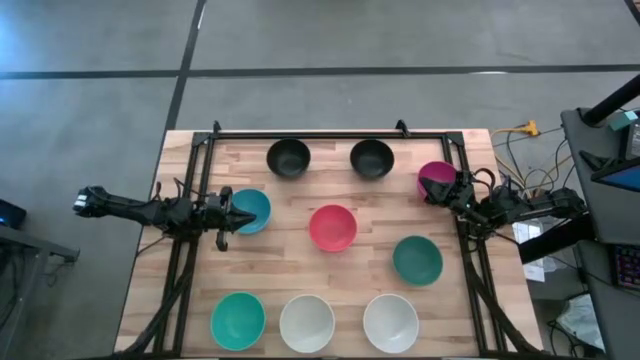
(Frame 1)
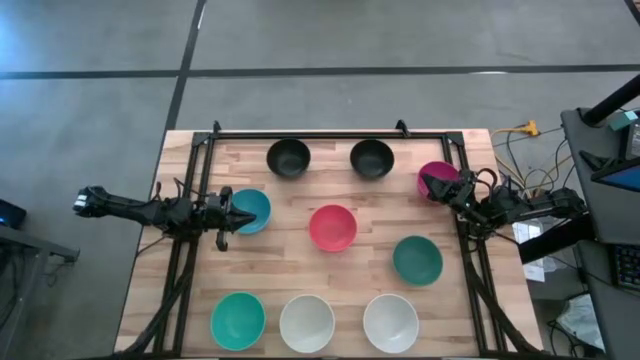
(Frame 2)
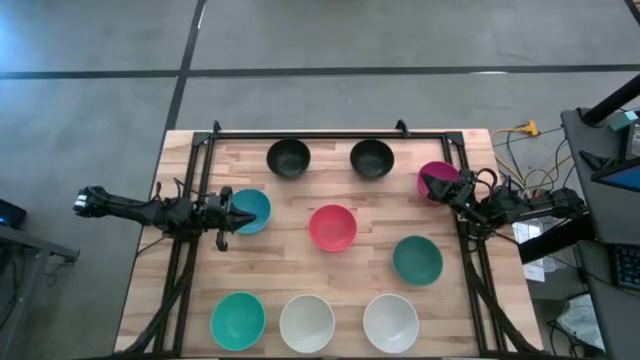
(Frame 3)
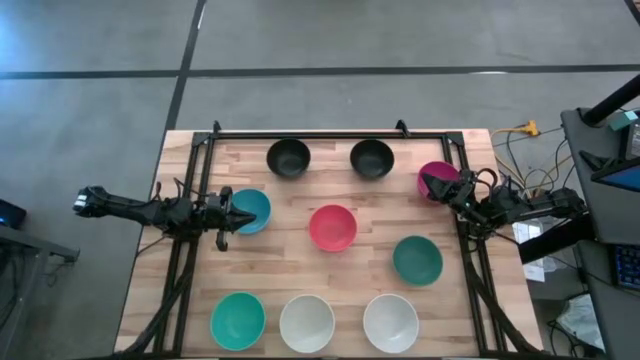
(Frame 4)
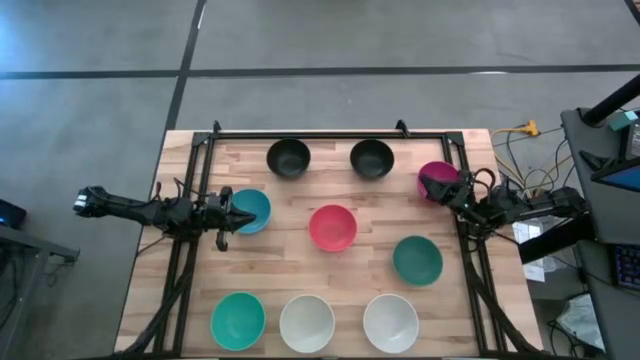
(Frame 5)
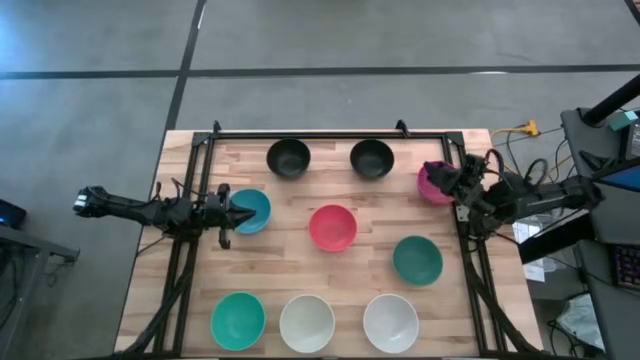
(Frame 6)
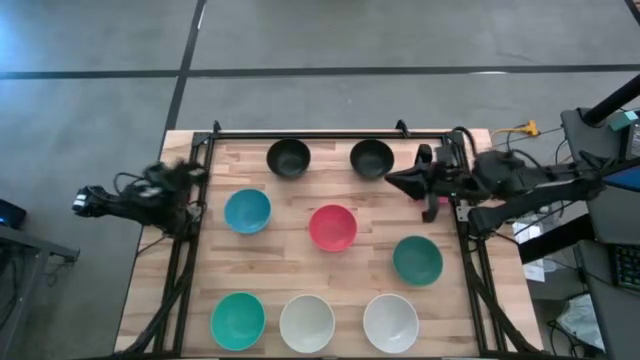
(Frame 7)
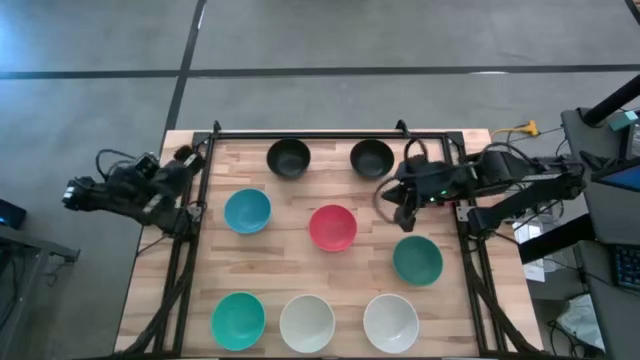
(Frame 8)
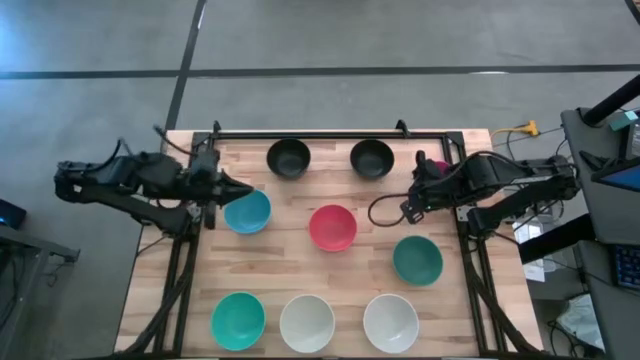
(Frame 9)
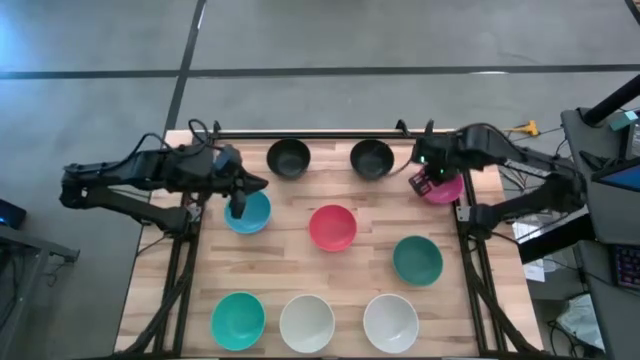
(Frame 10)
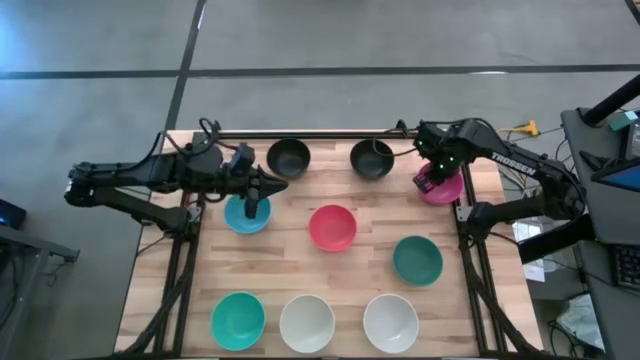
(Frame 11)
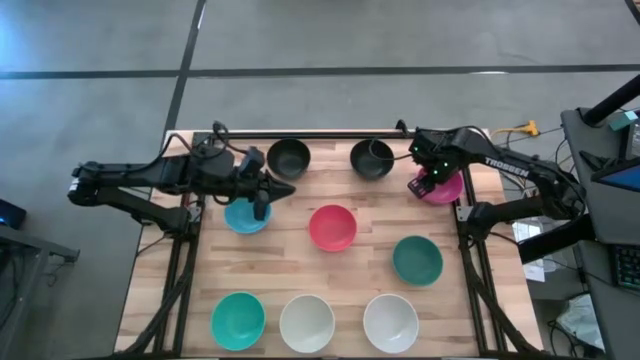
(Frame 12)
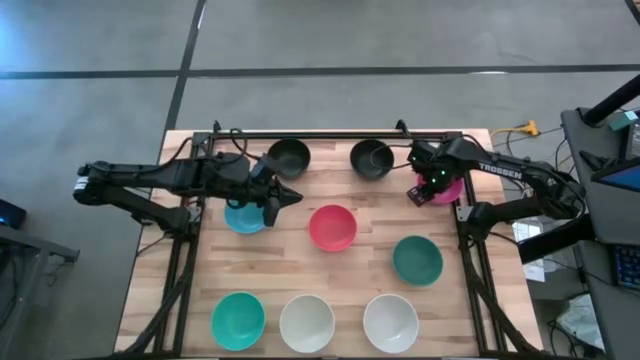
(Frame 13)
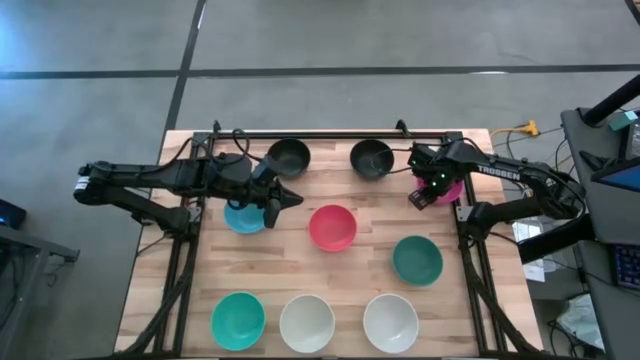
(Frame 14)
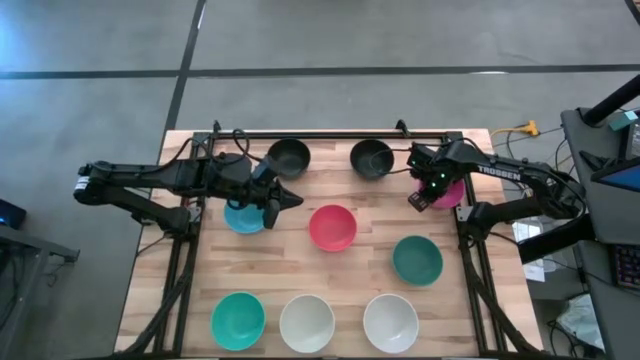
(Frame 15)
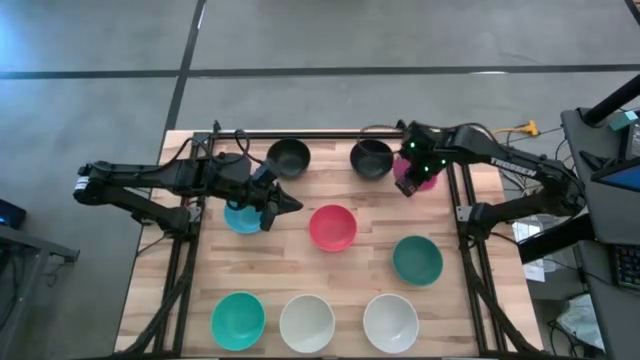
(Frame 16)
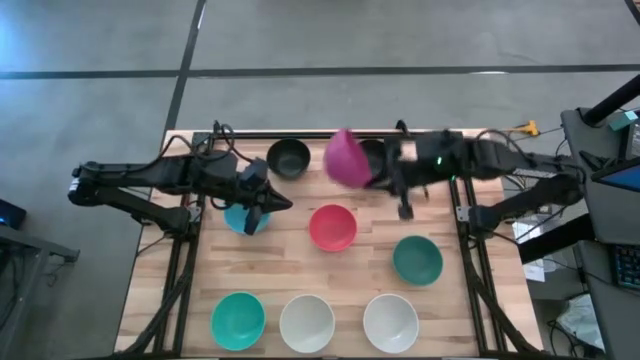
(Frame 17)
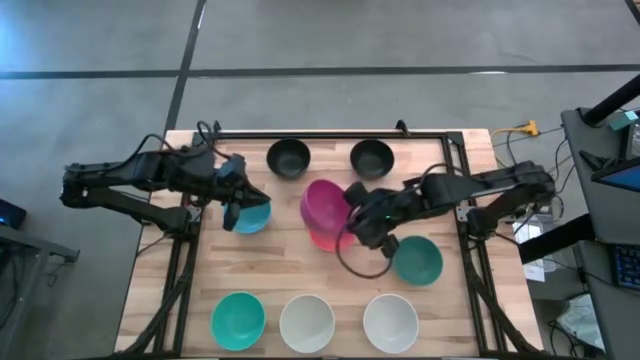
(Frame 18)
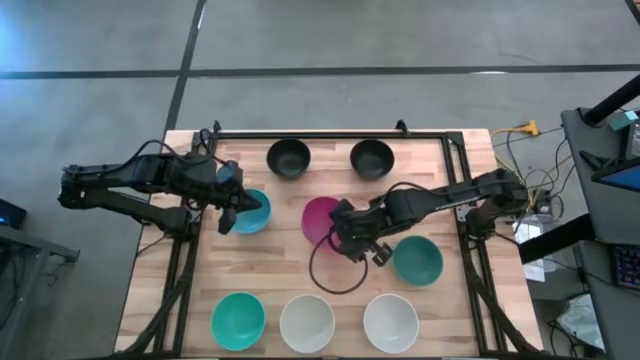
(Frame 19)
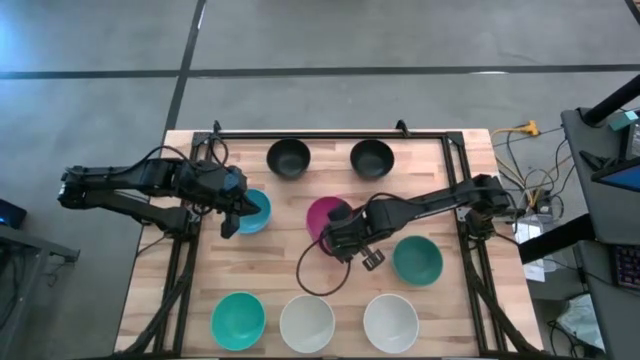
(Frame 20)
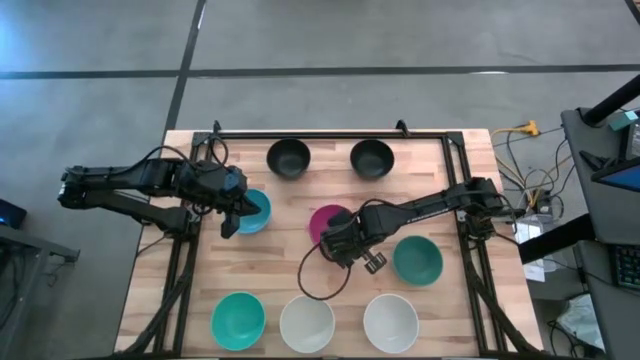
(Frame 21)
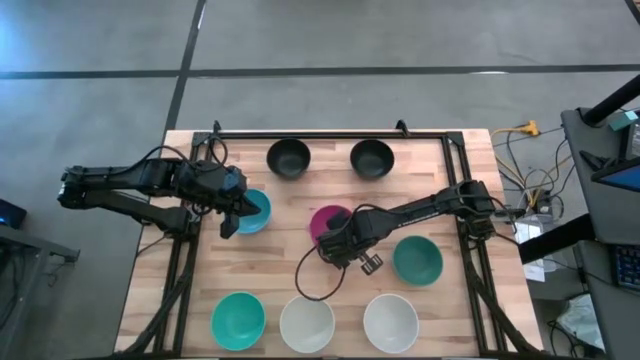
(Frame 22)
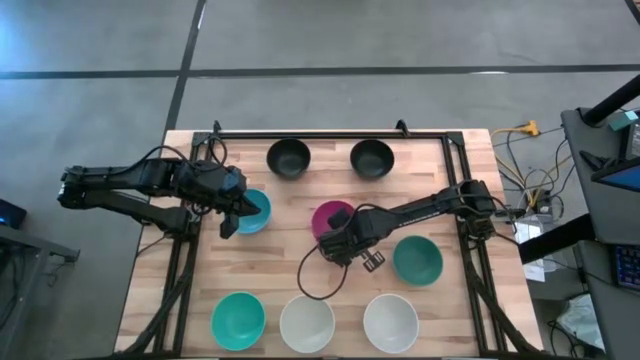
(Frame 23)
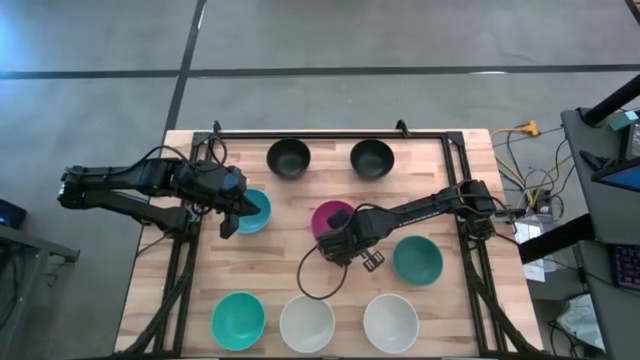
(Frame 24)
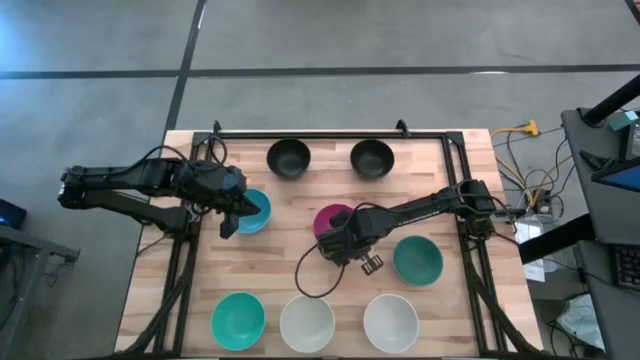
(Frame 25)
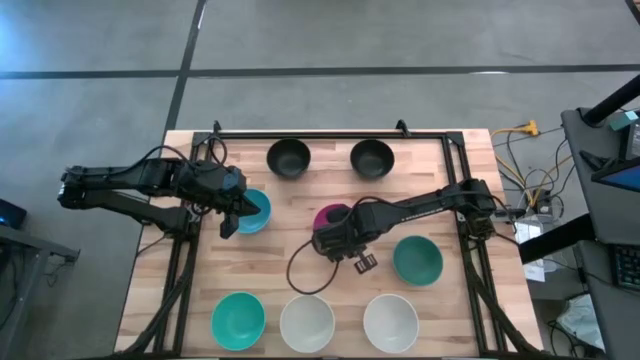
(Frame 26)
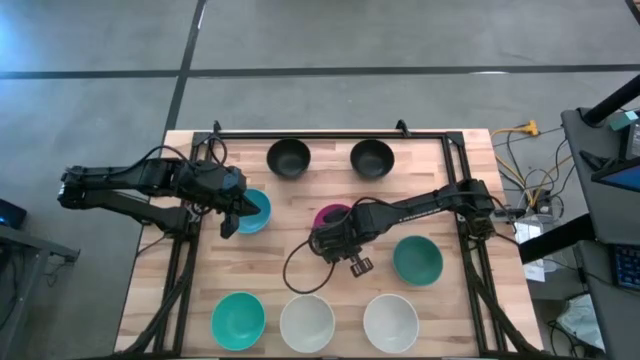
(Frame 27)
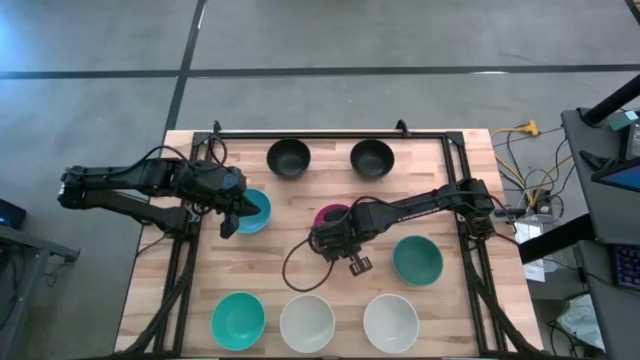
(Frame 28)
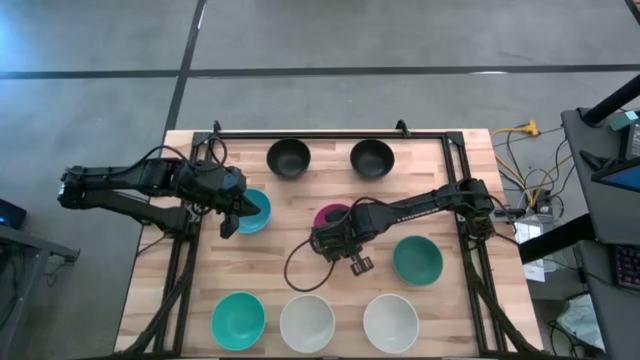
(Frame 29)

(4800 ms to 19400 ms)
Task: Nest bowls inside each other
Stack the pink bowl on the orange bowl

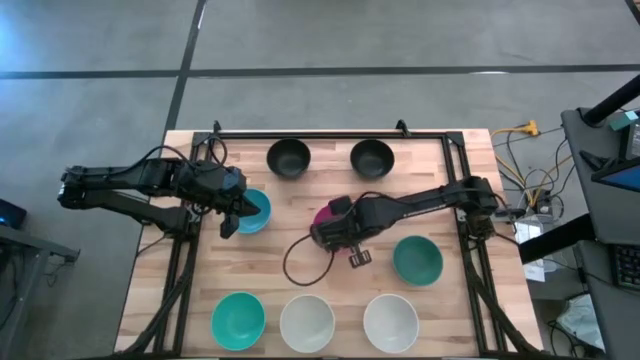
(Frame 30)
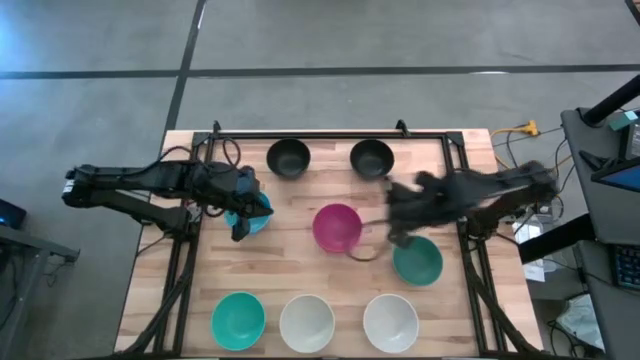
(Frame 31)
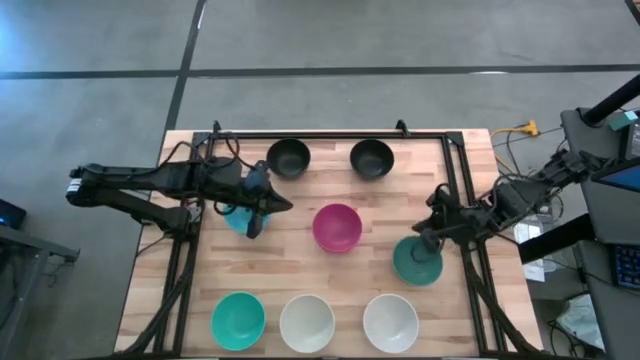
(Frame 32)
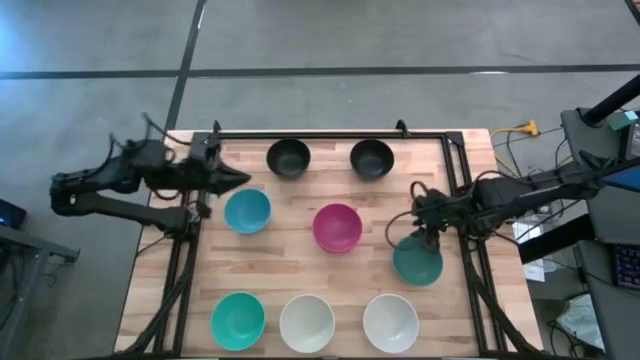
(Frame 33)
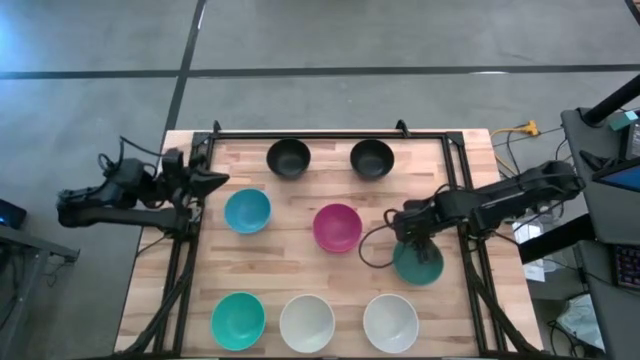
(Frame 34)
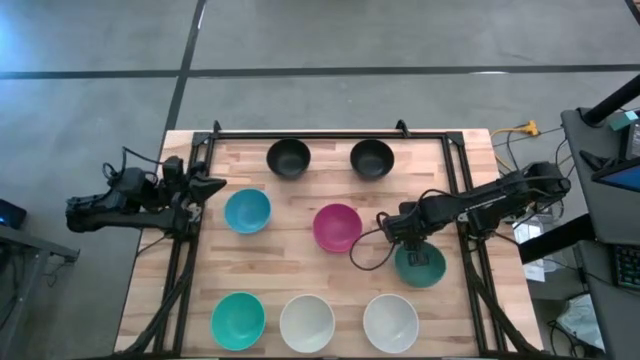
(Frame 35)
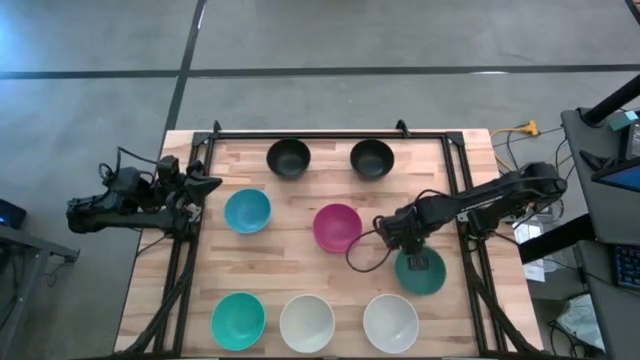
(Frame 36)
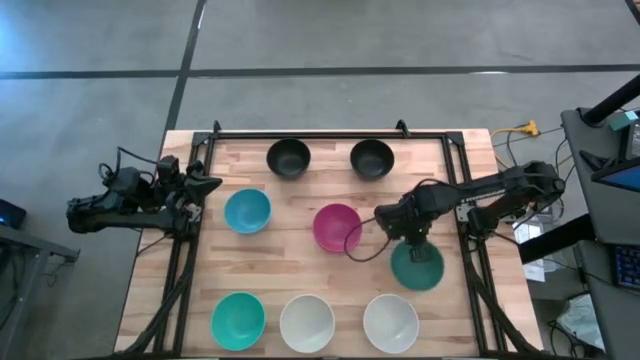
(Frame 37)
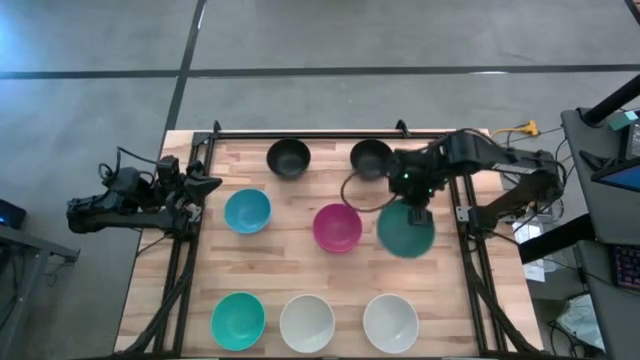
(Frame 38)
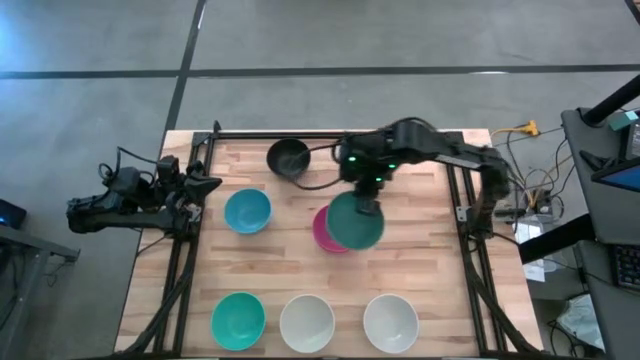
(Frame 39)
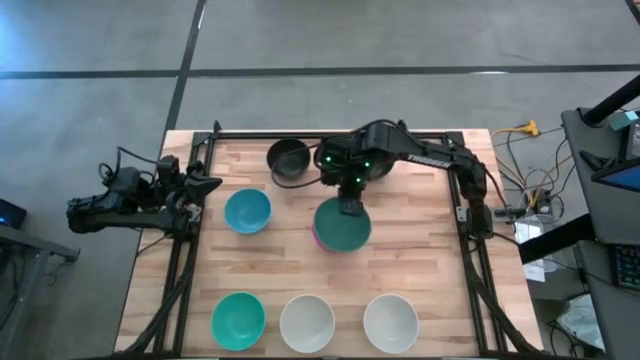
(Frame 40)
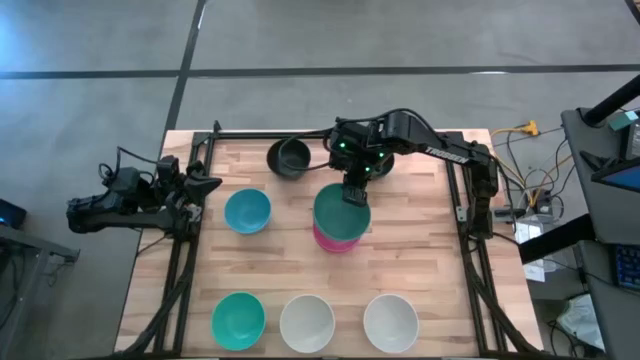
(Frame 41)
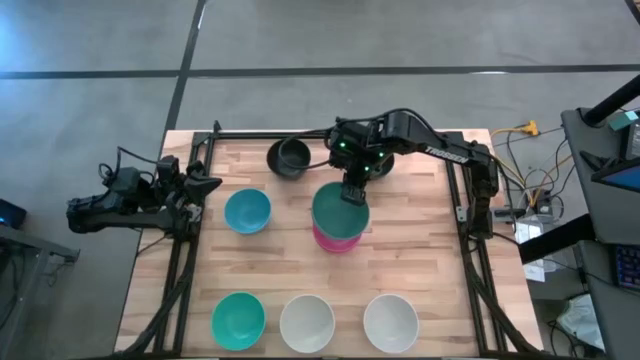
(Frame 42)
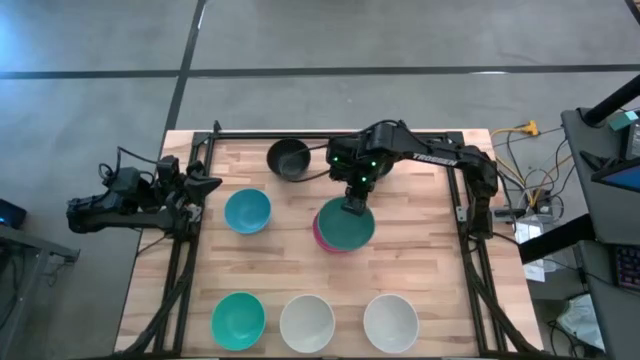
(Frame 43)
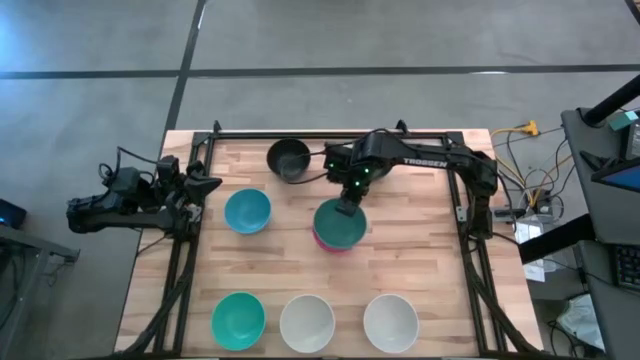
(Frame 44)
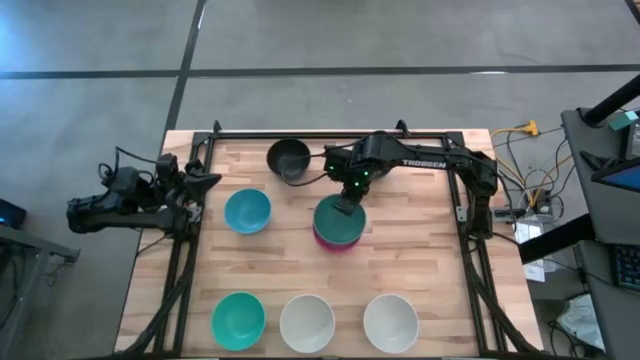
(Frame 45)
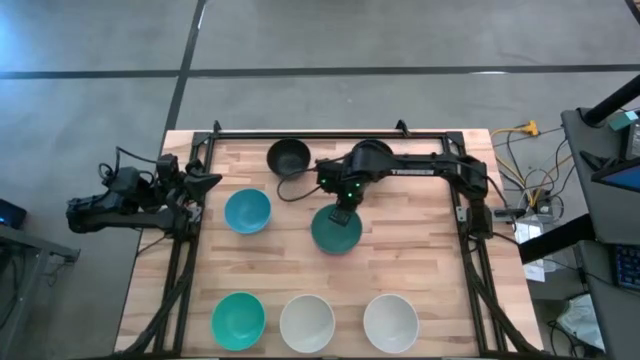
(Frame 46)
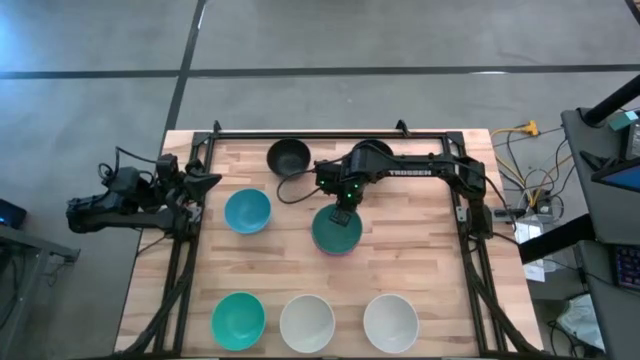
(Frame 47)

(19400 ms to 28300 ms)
Stack the green bowl on the pink bowl
